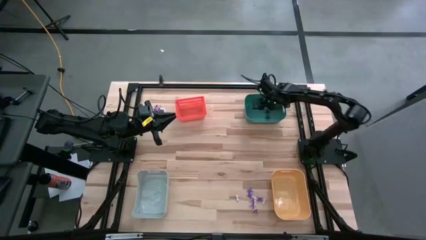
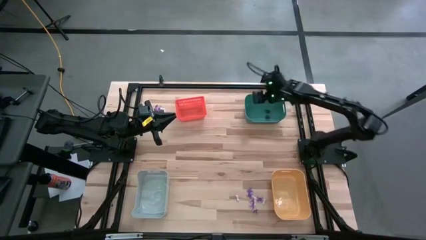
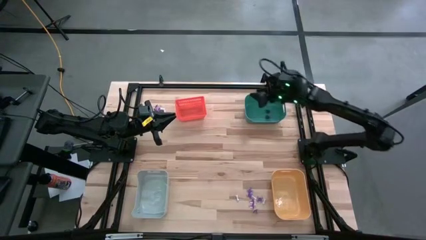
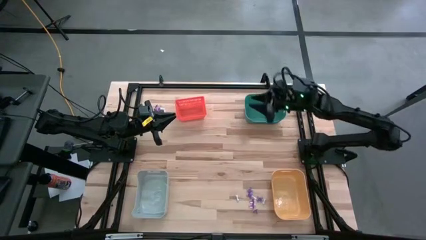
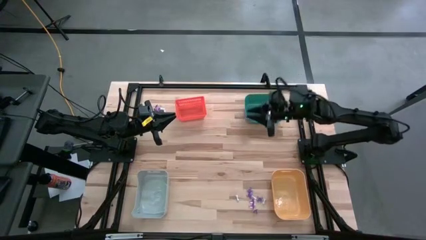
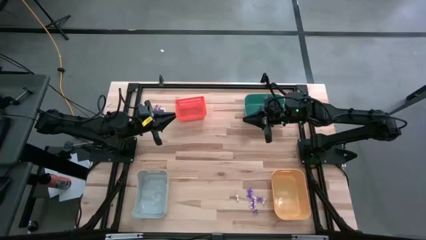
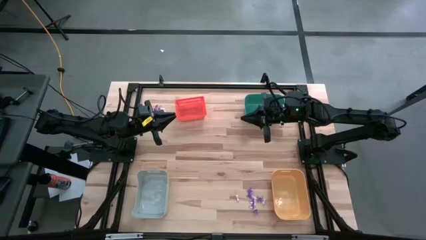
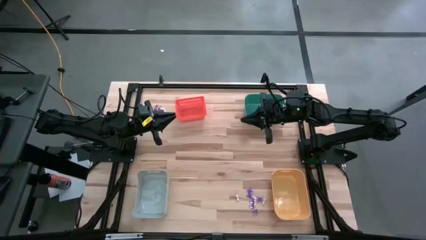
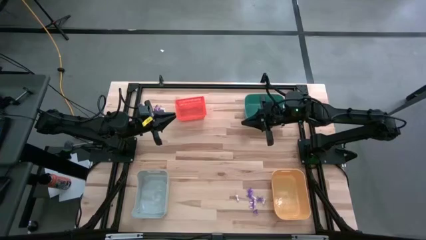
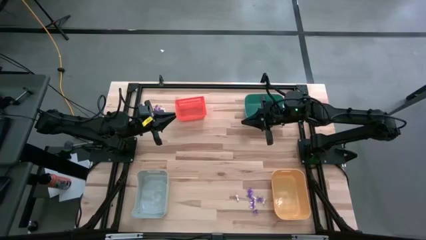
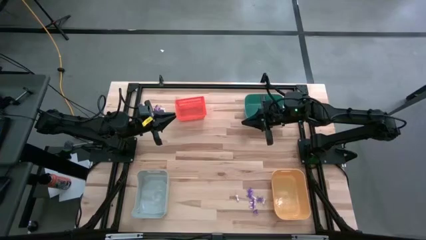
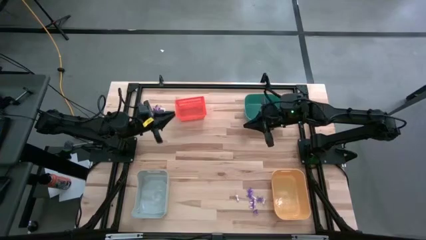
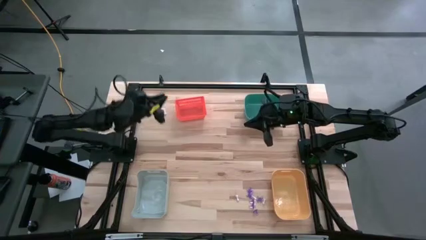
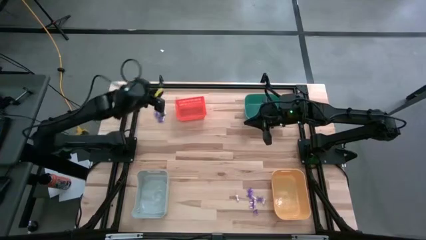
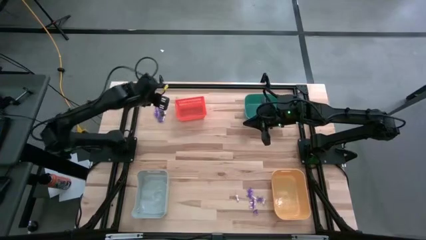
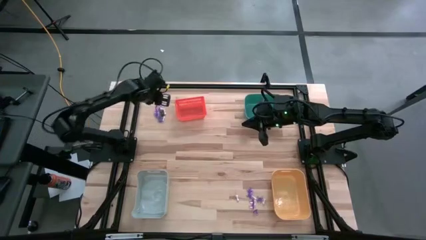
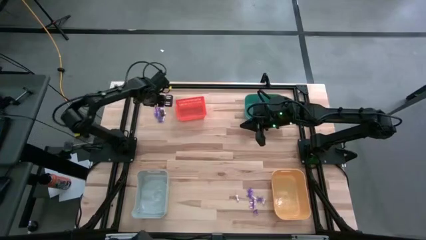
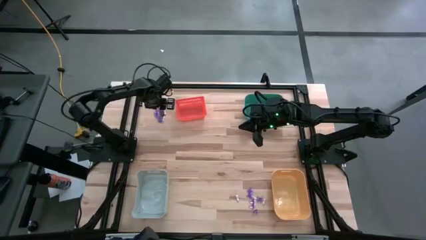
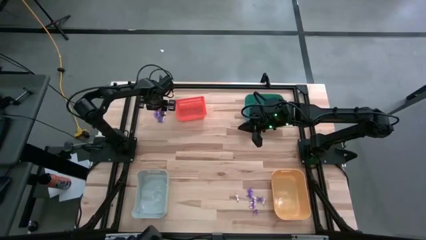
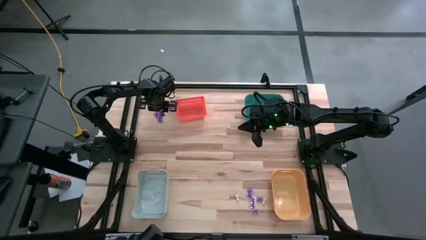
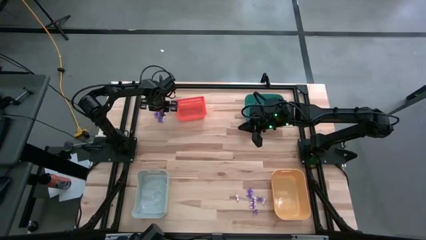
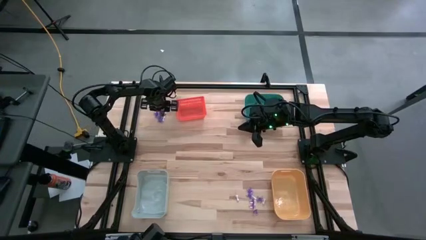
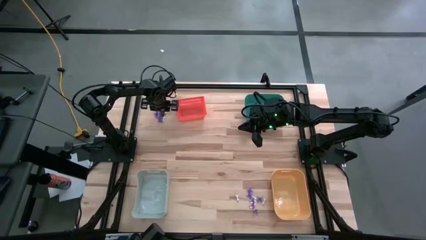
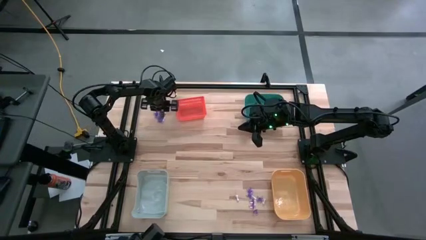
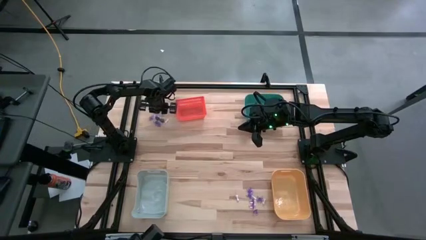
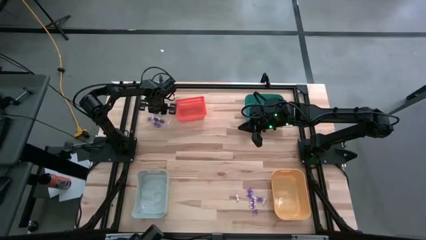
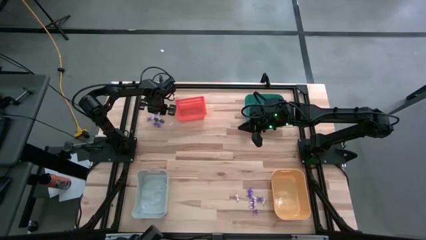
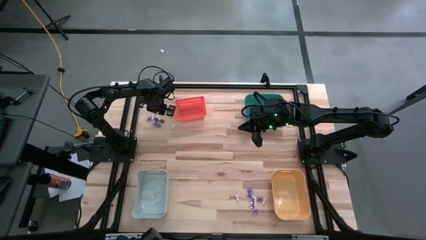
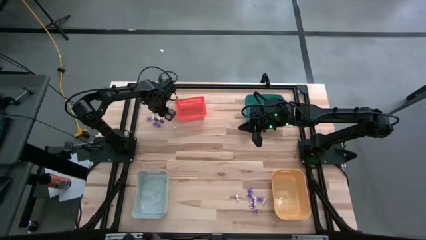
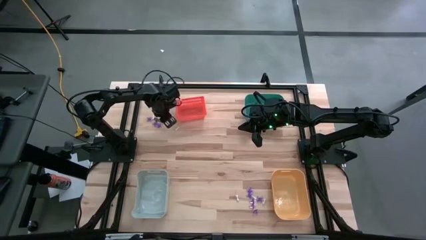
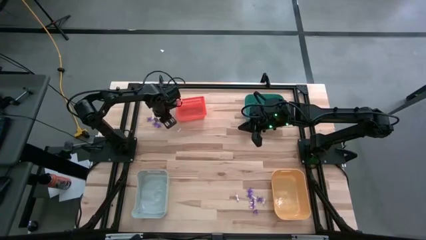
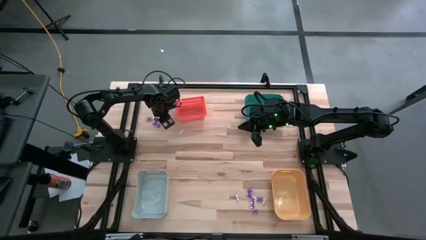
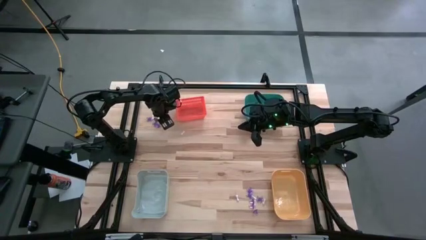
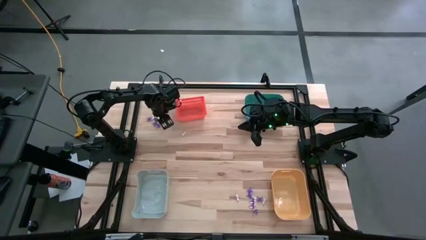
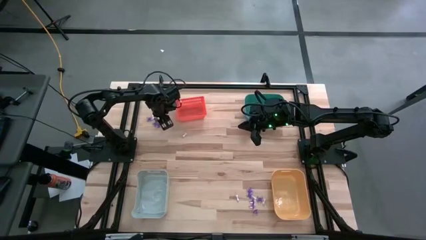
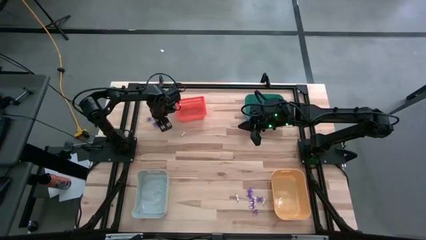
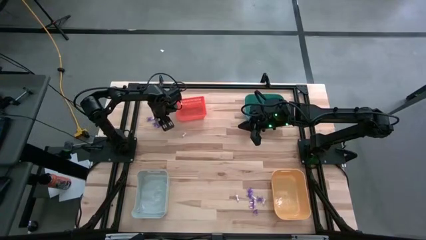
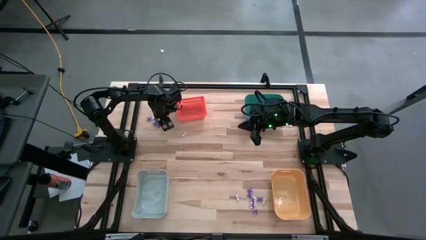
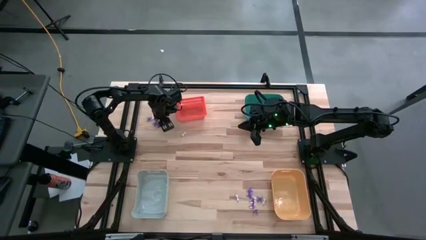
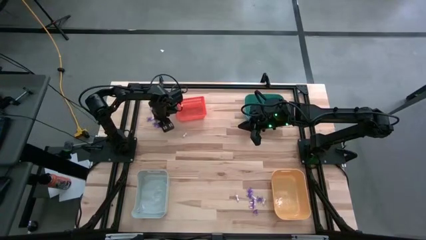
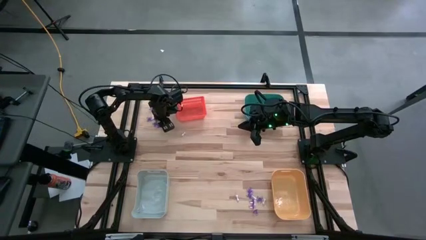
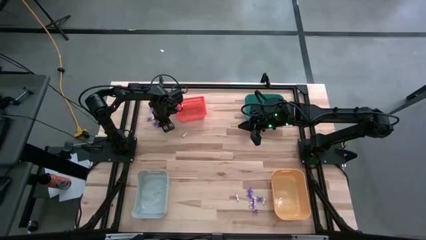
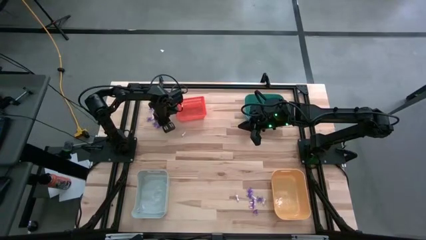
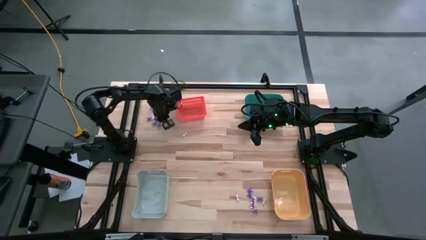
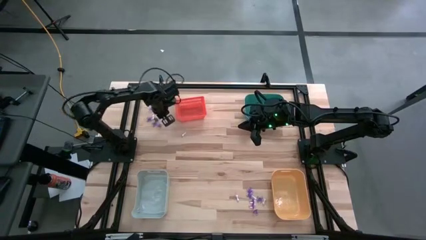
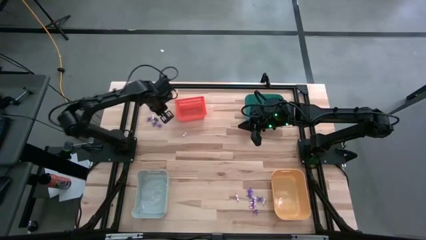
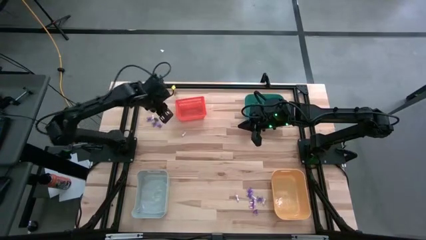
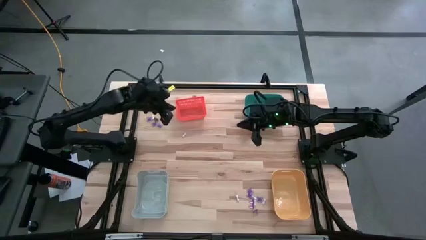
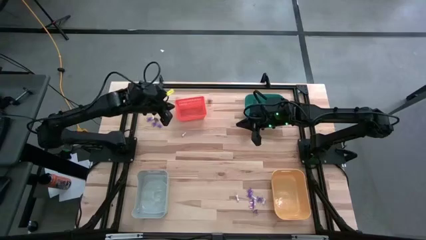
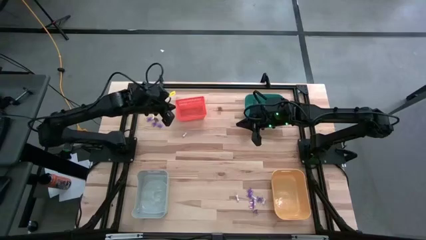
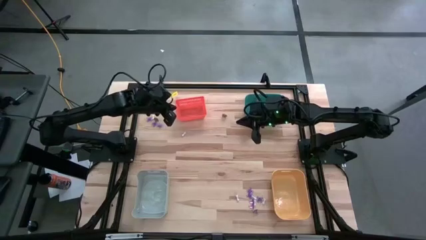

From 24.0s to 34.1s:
Task: Sort Halloween decoration
Put the black skull toy into the green bin

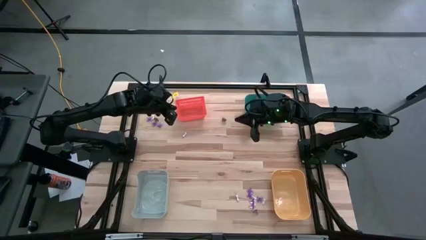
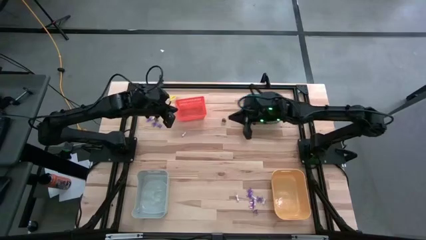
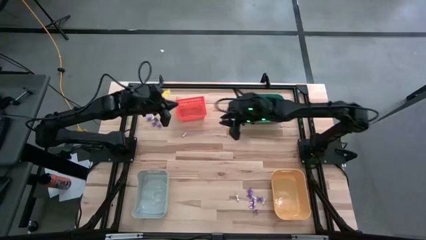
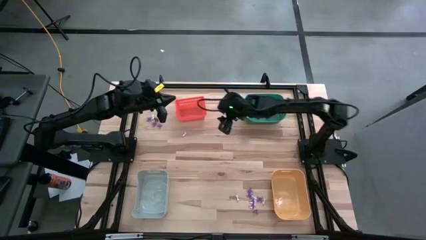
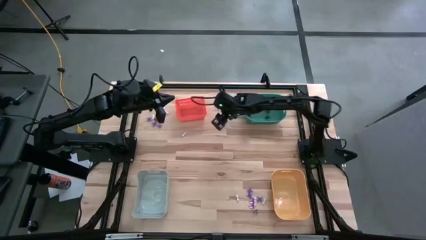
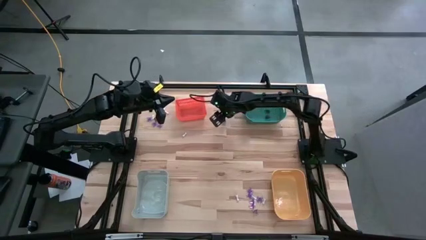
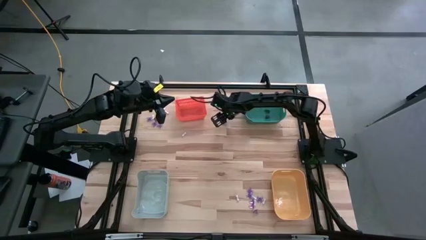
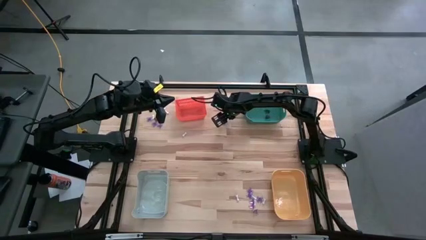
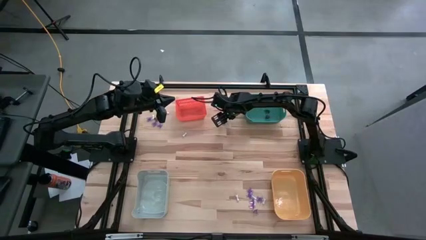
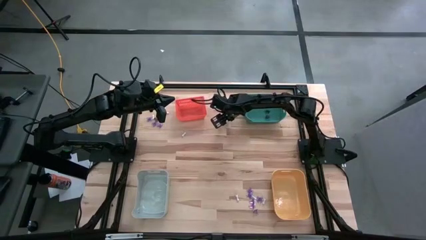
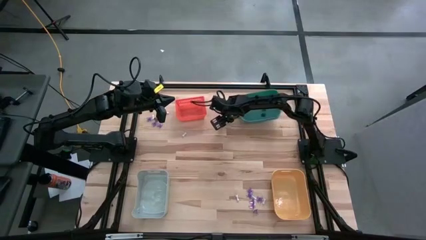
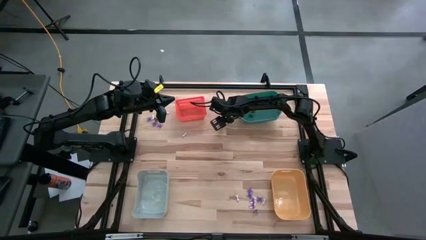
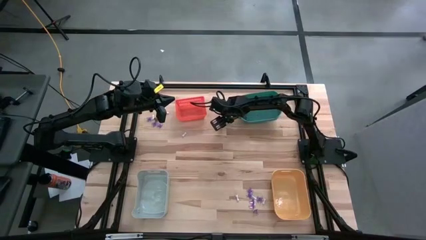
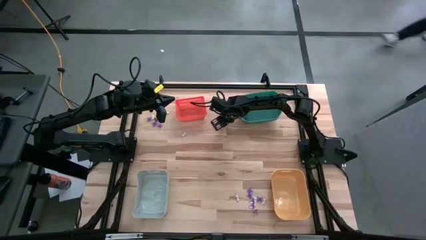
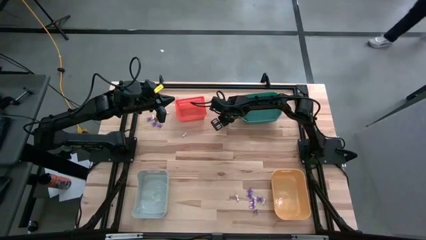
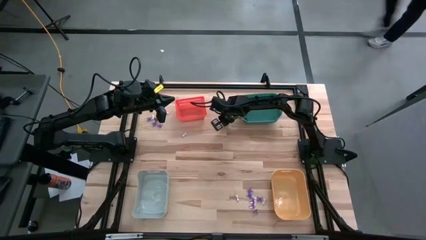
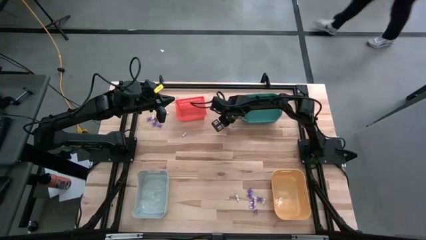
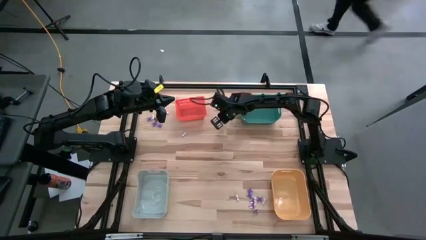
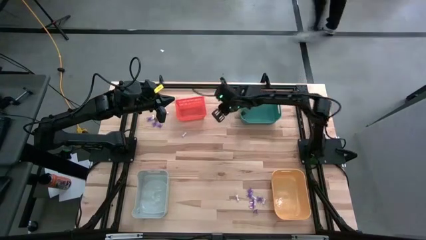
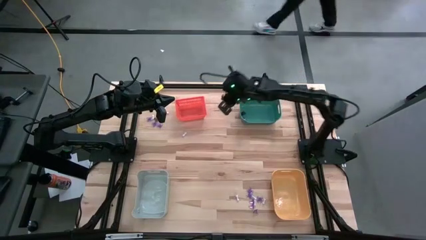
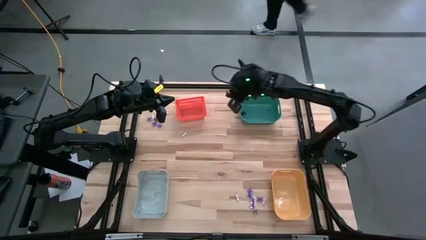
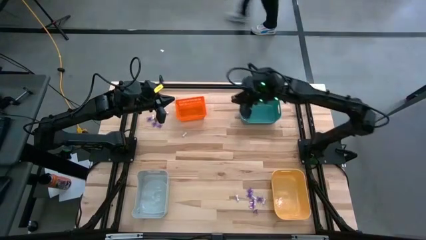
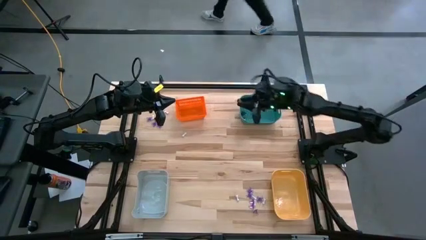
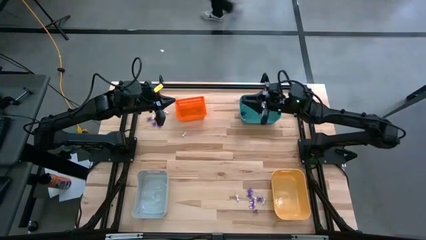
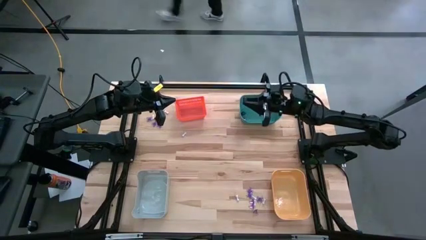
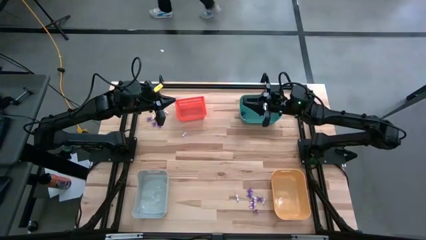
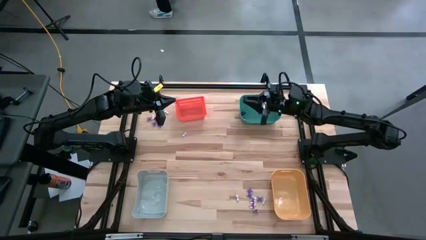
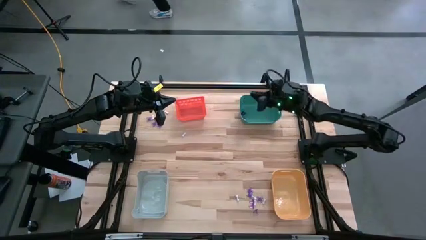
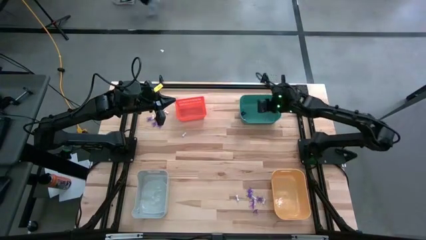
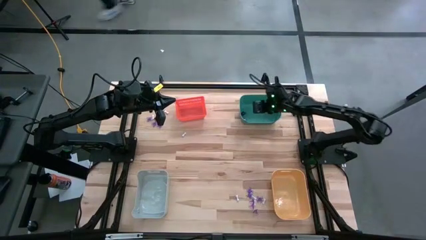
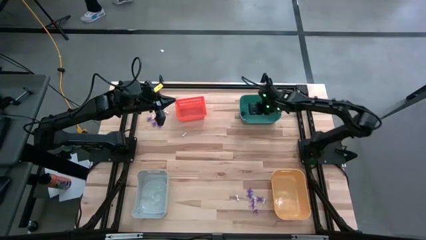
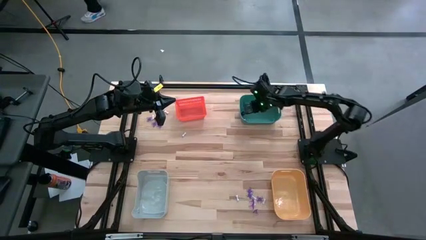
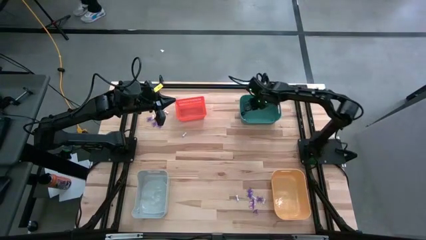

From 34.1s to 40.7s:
Put the black skull toy into the green bin
